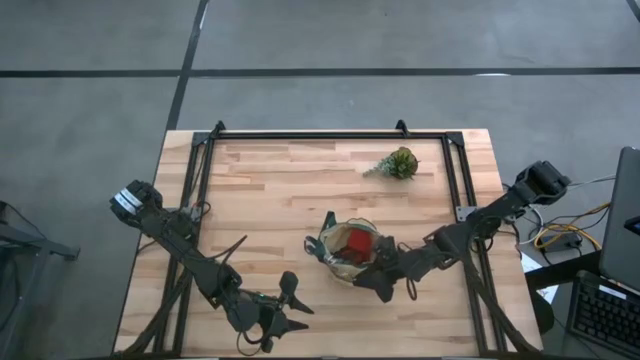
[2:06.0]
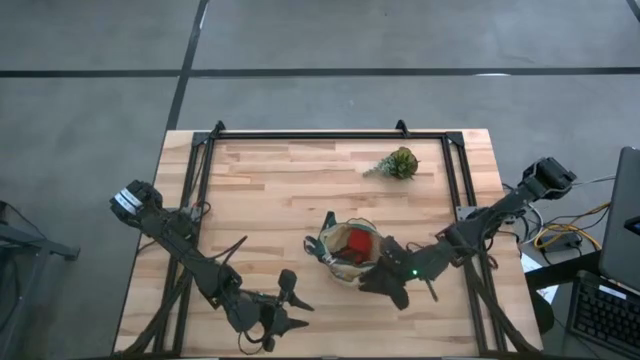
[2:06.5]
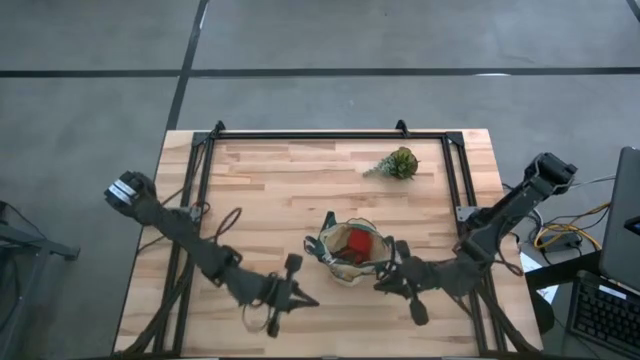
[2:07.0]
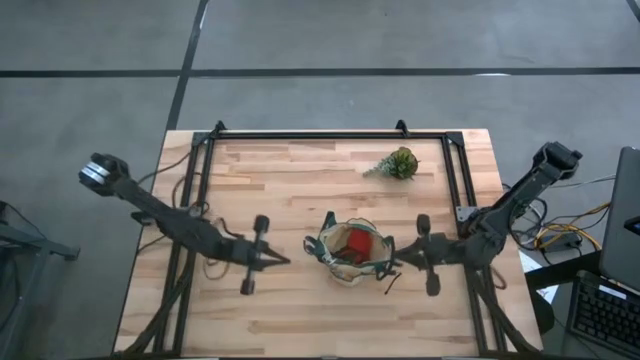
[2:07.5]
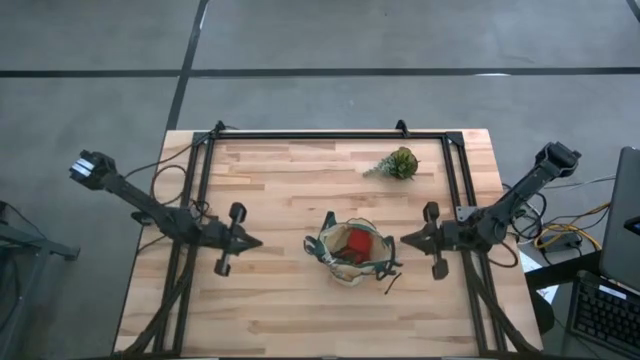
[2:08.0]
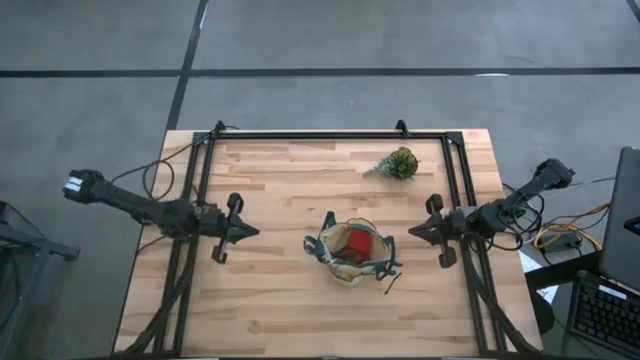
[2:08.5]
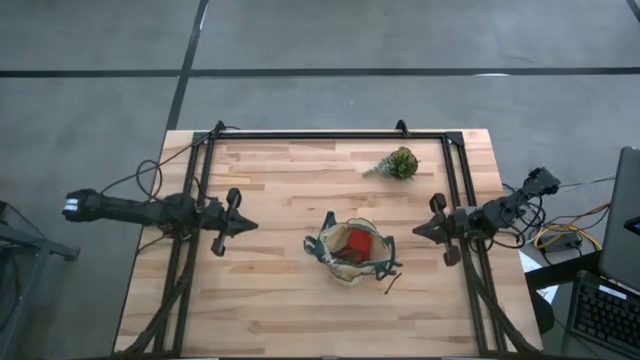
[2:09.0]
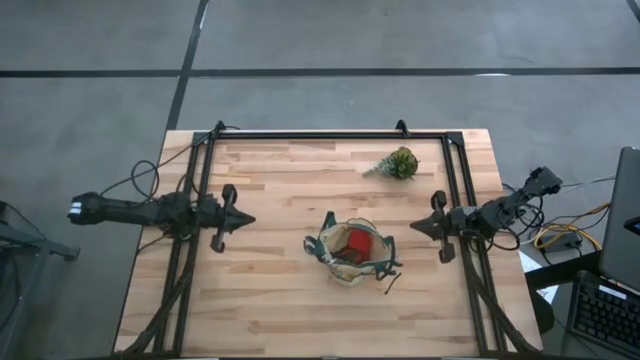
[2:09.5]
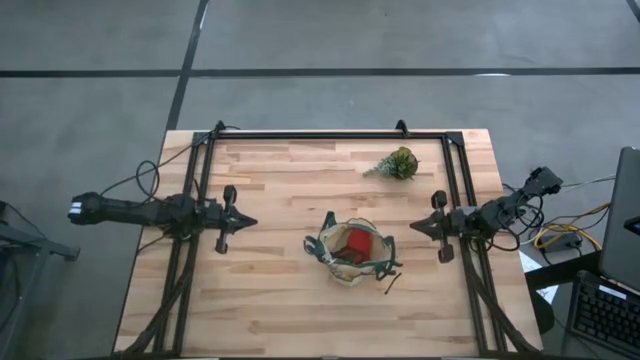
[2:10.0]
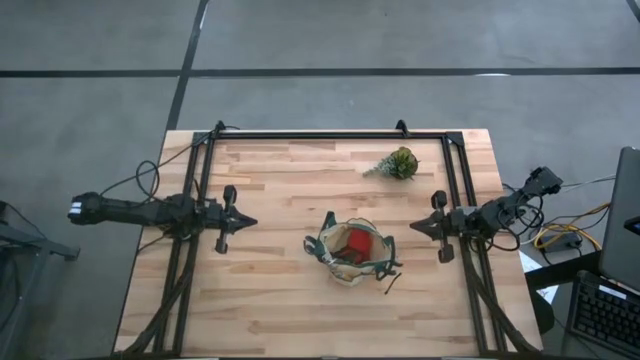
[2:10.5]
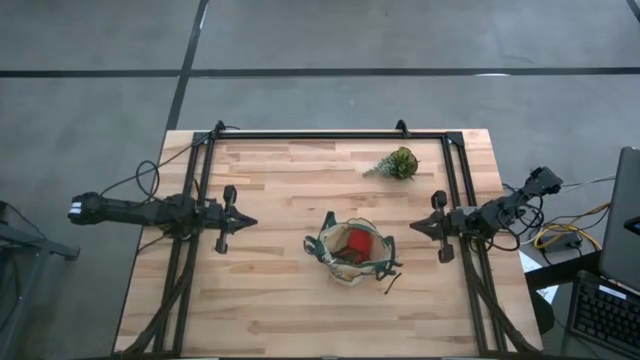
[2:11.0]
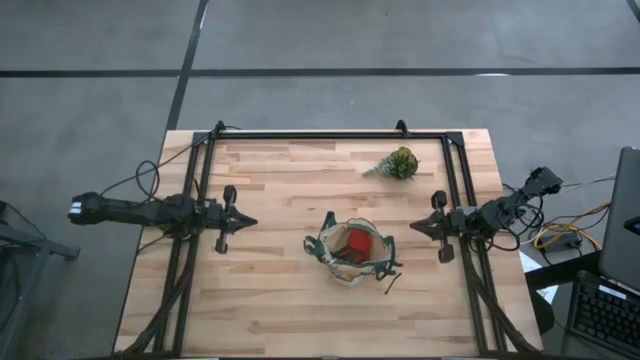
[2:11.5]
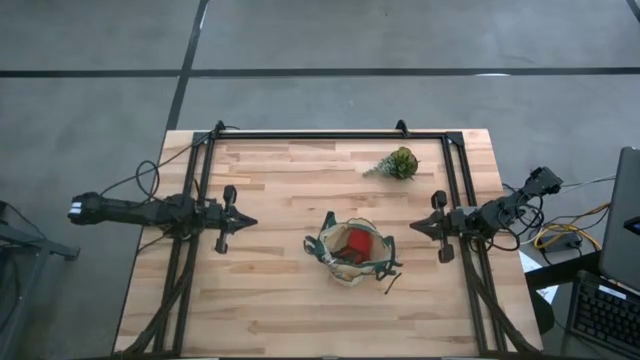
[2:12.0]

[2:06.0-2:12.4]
Task: Pick & Place Garden tools in Gardening bag
Return to Home Position

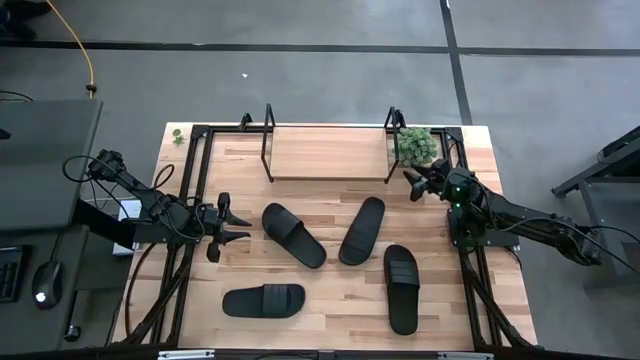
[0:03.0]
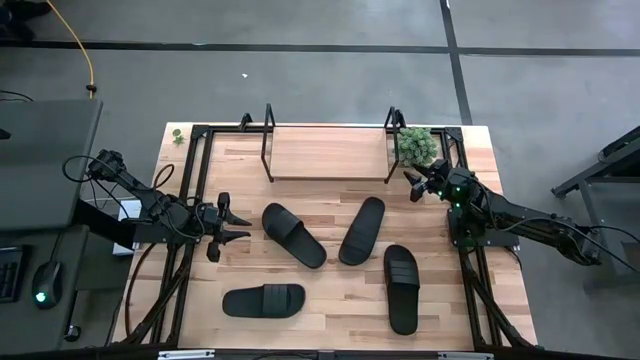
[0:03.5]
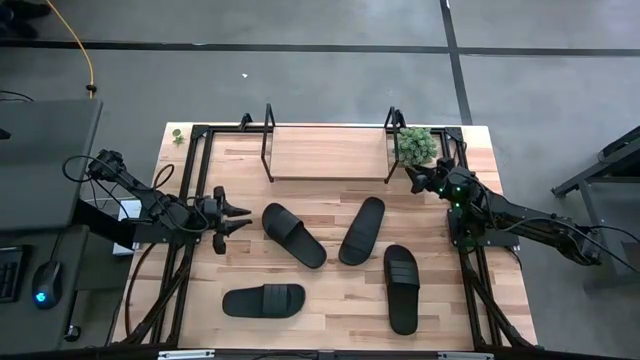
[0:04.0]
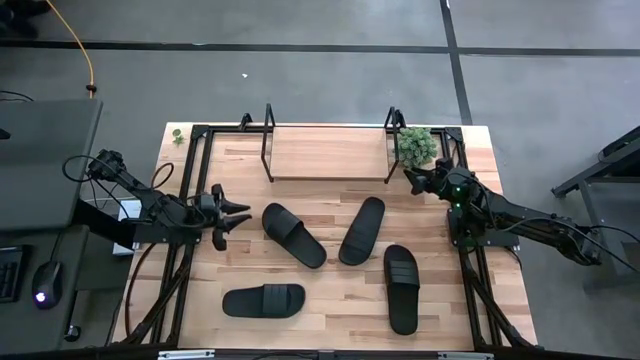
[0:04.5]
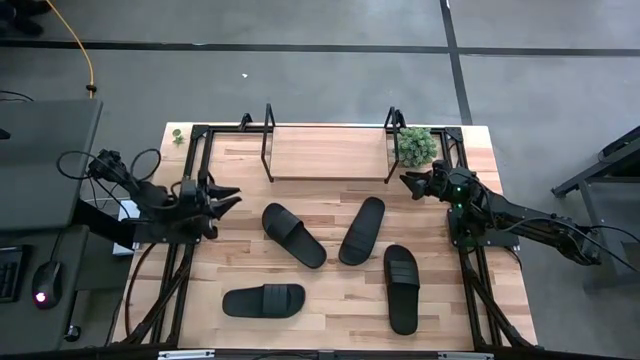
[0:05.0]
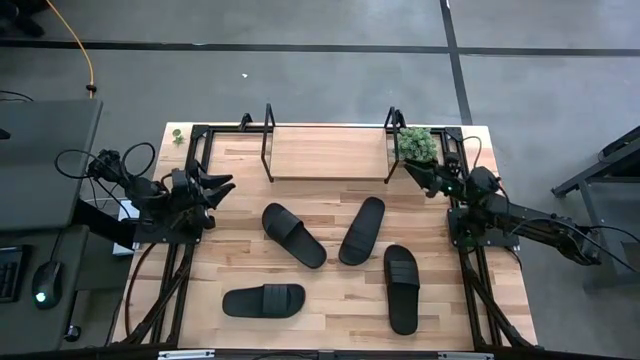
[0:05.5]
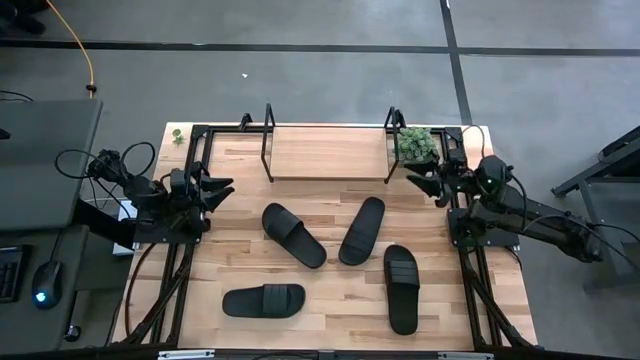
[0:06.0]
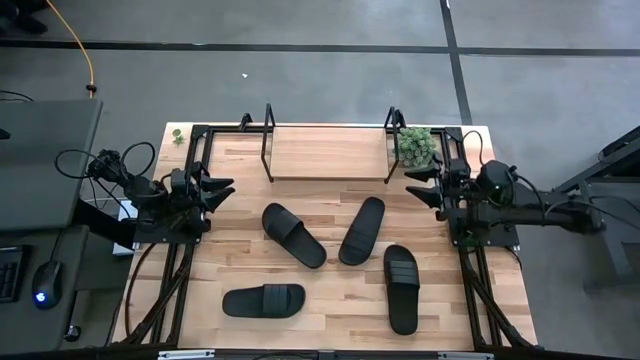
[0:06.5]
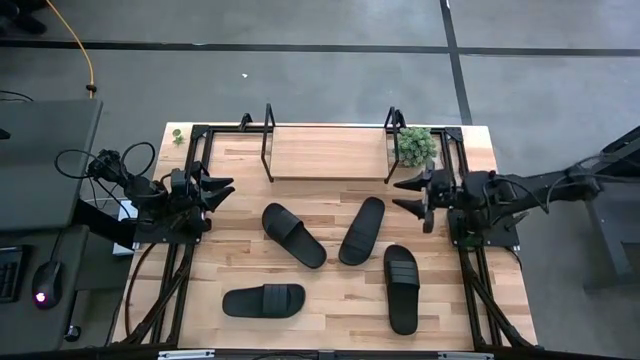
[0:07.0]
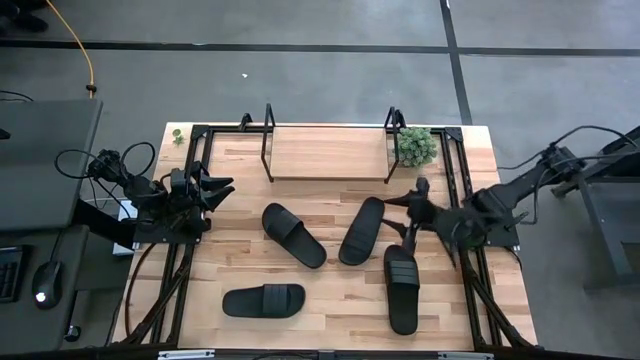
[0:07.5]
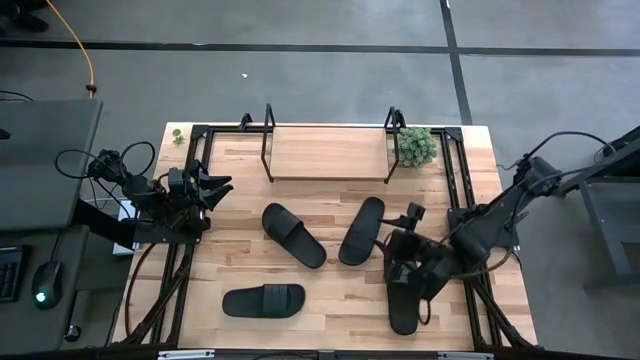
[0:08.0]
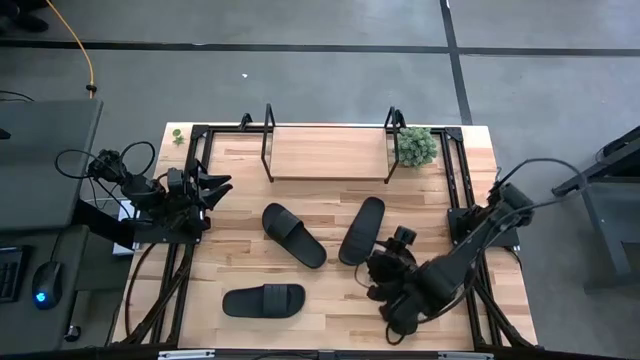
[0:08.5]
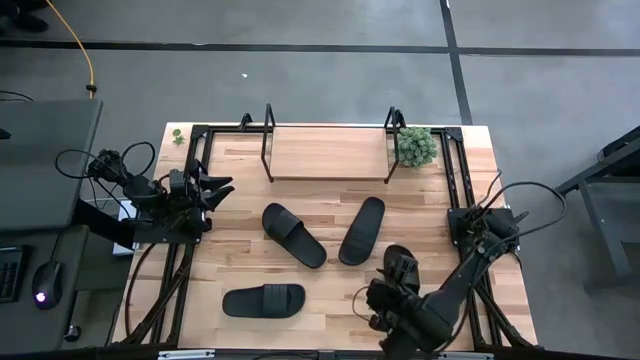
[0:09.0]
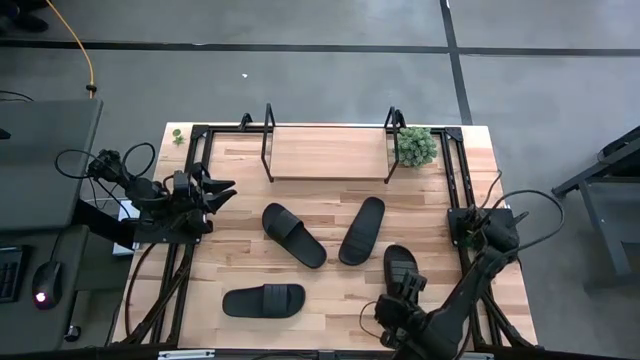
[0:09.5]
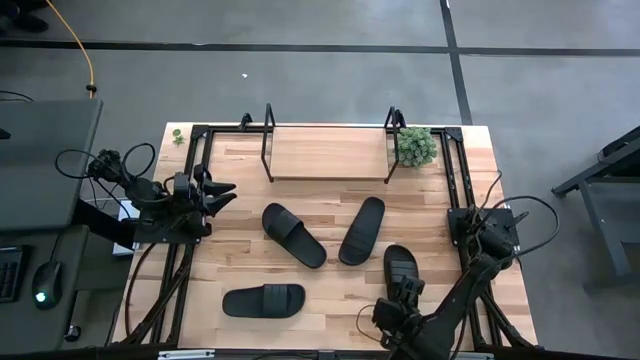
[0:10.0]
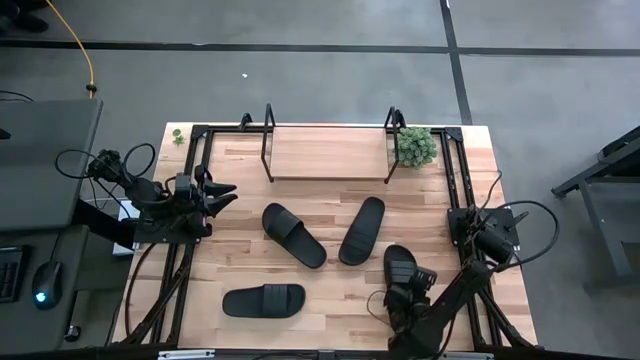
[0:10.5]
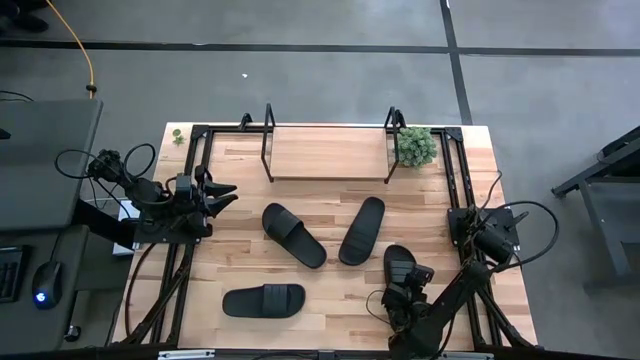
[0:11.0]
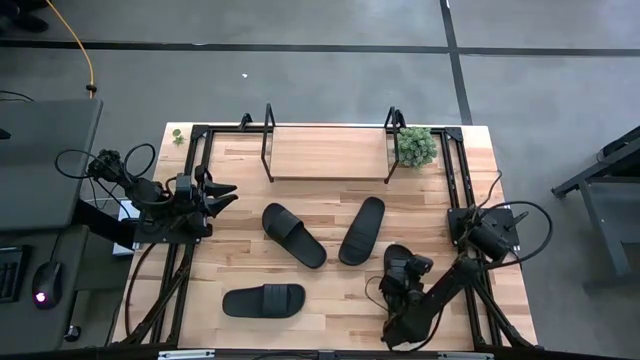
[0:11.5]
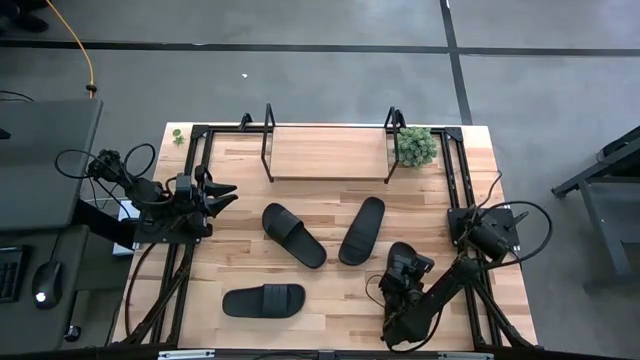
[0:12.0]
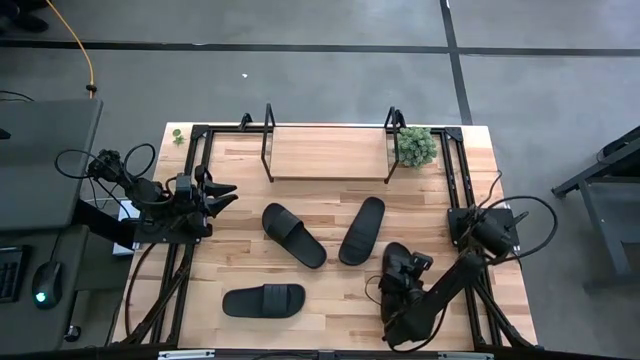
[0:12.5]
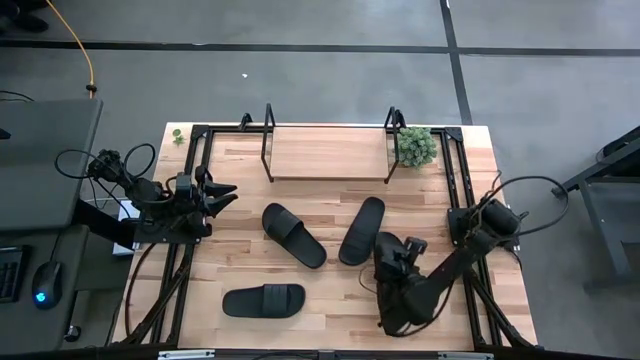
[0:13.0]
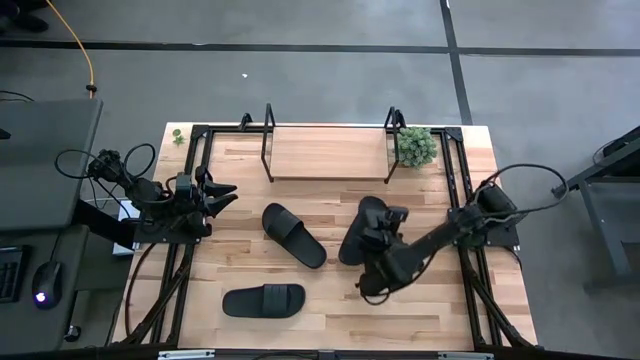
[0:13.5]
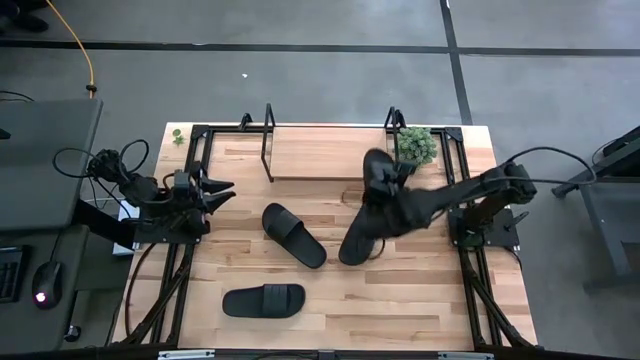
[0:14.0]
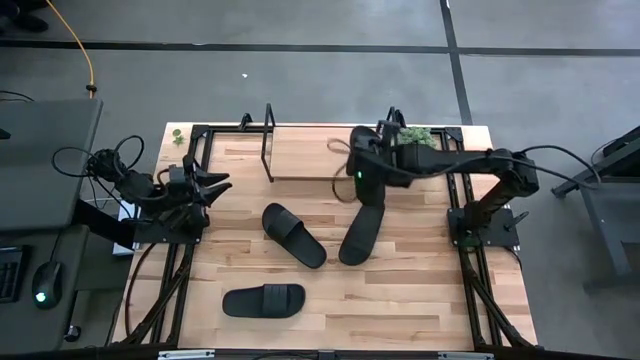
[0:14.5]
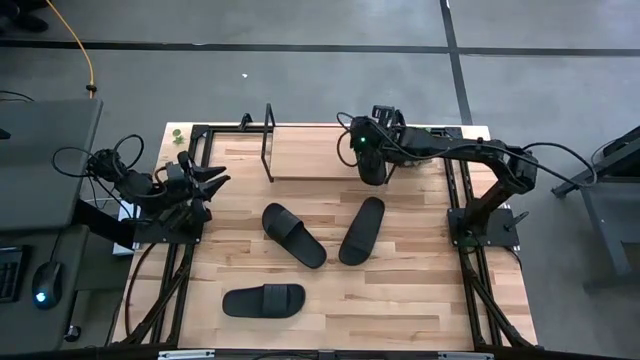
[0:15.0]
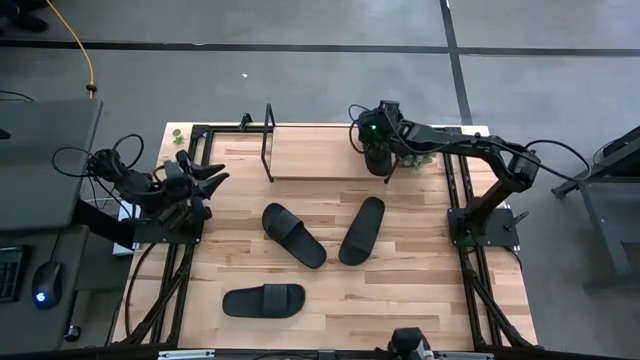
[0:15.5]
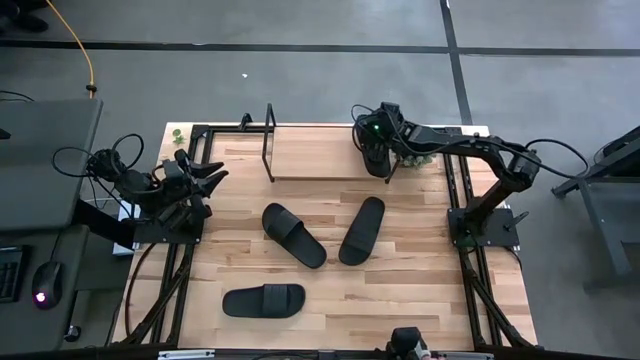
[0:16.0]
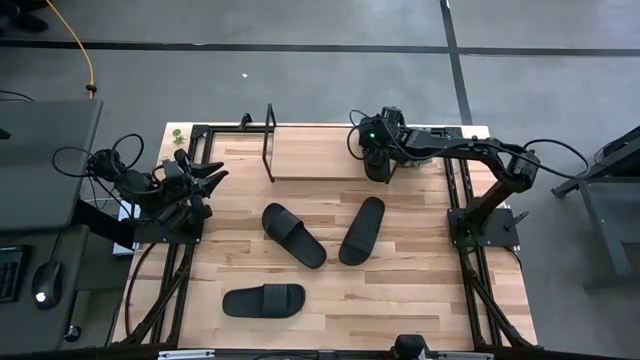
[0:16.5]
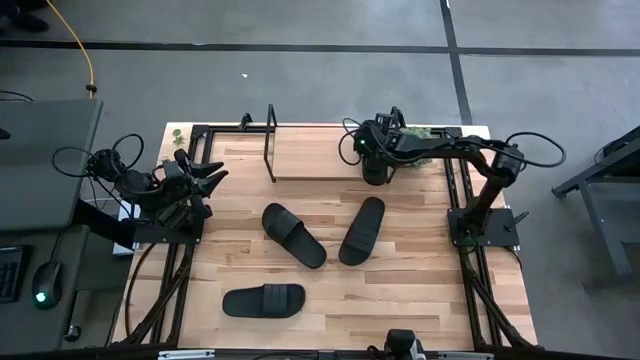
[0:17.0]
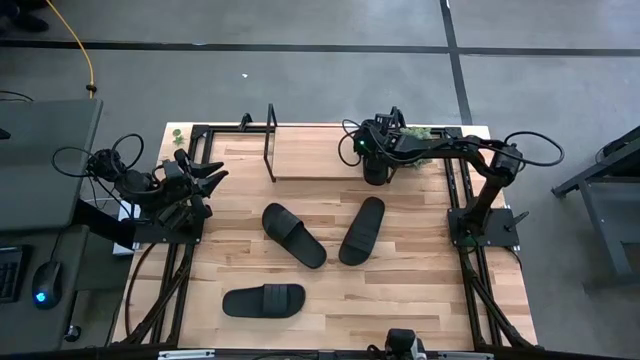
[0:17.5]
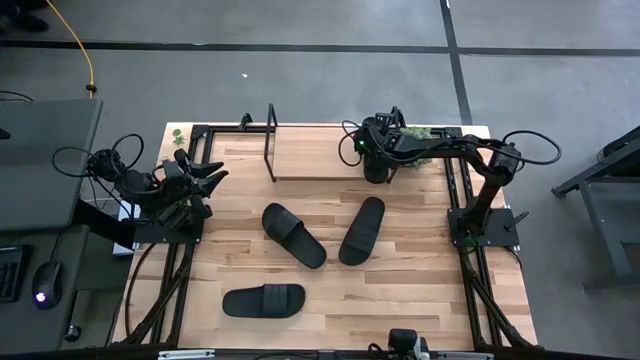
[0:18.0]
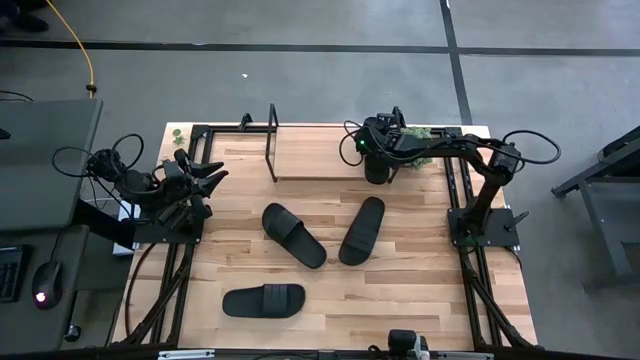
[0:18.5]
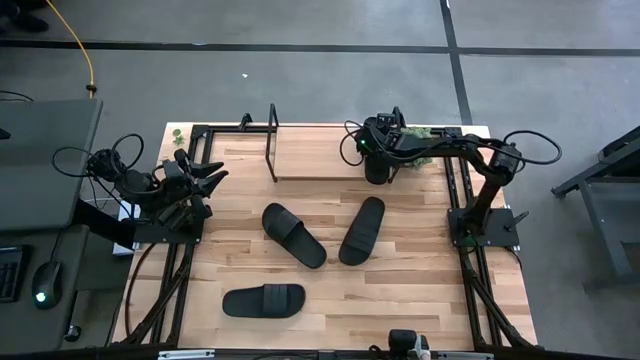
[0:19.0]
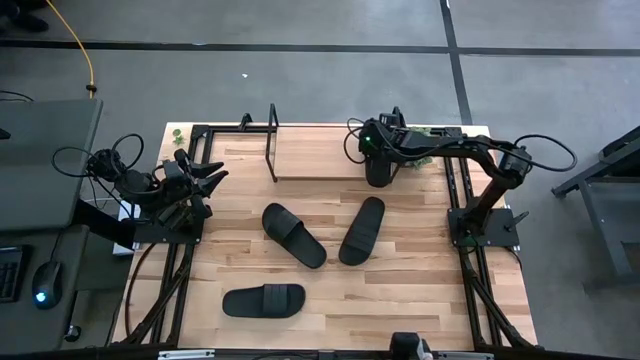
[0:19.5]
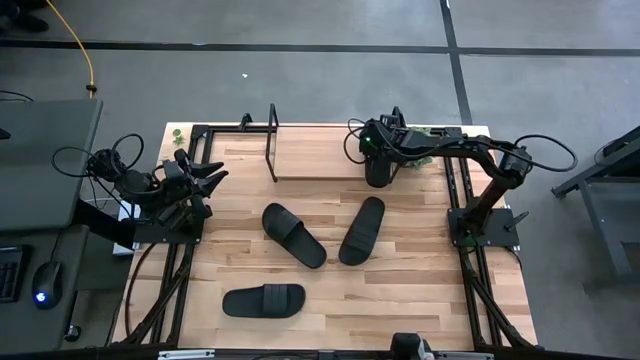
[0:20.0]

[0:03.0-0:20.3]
Task: Pick and place slides into the shelf
Put the black slipper on the shelf
